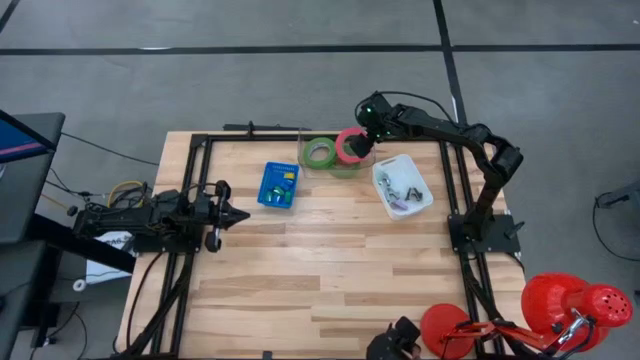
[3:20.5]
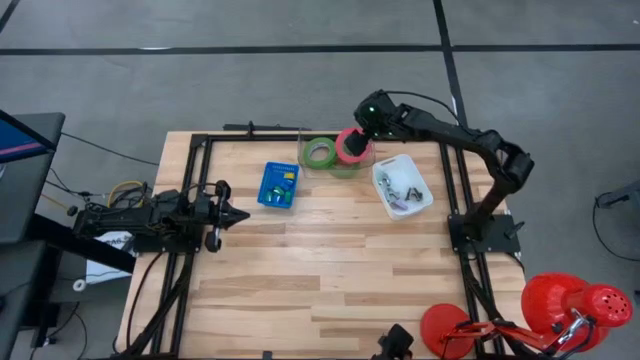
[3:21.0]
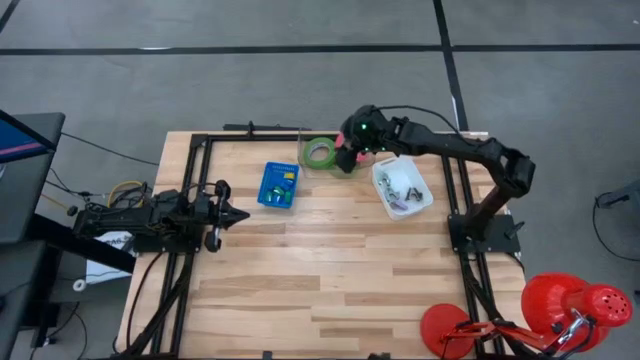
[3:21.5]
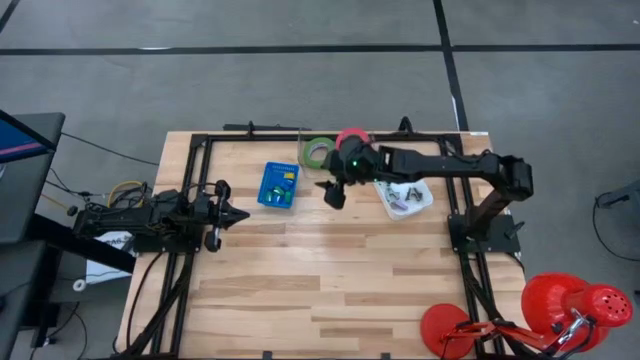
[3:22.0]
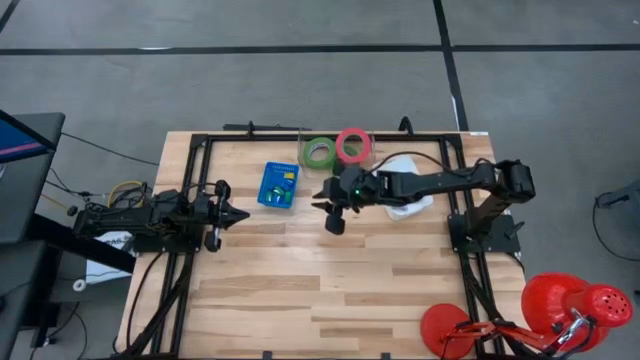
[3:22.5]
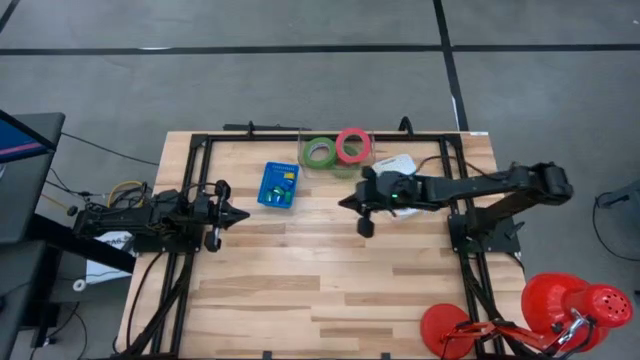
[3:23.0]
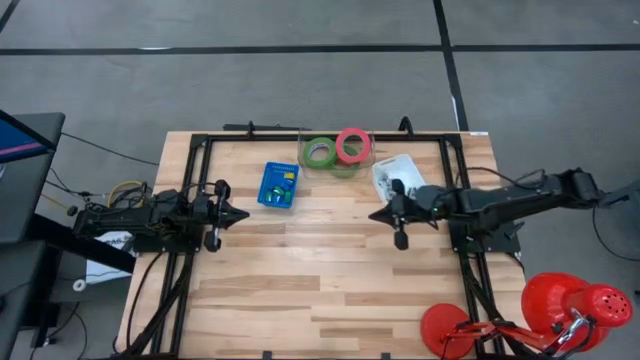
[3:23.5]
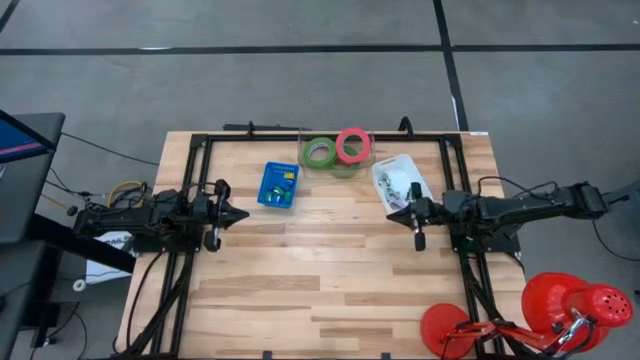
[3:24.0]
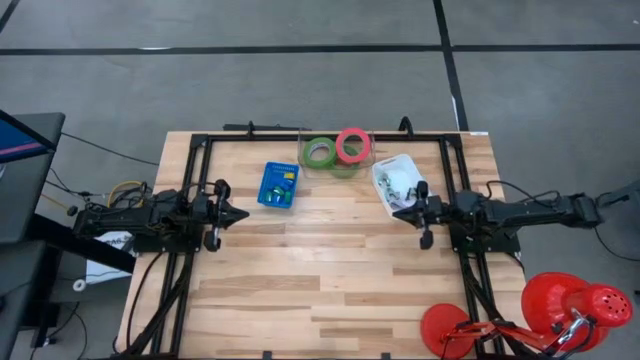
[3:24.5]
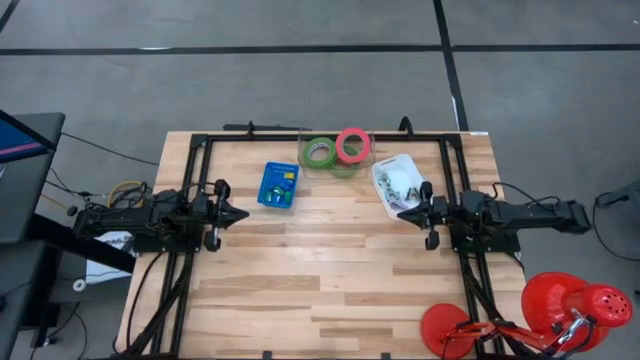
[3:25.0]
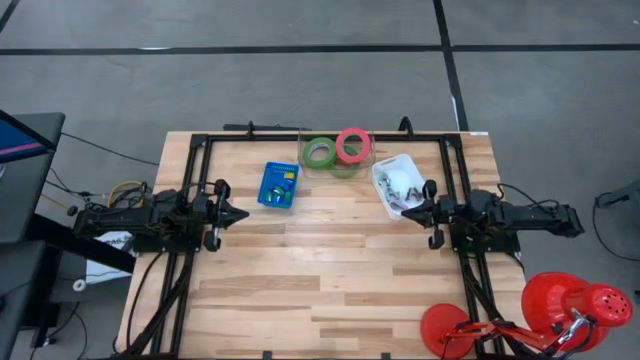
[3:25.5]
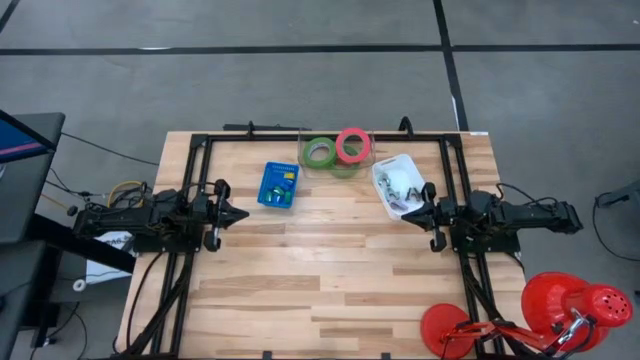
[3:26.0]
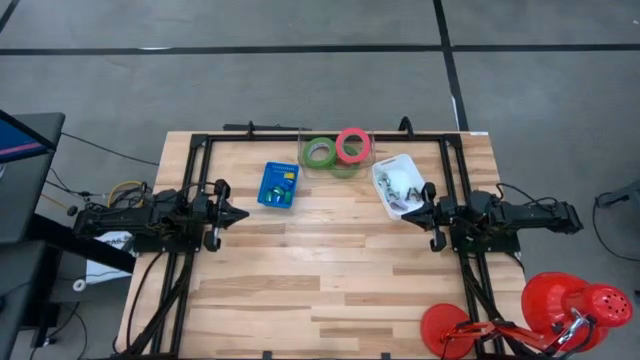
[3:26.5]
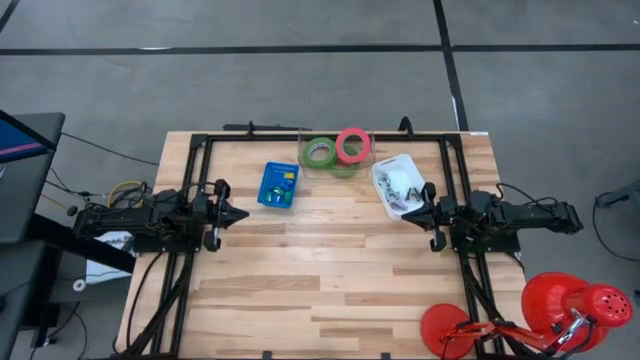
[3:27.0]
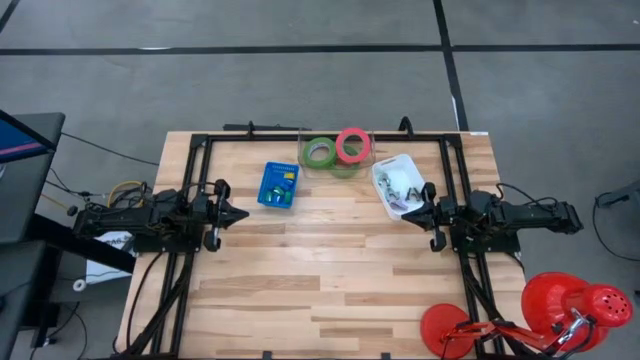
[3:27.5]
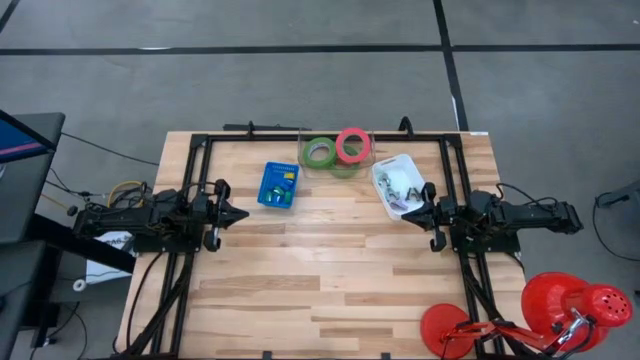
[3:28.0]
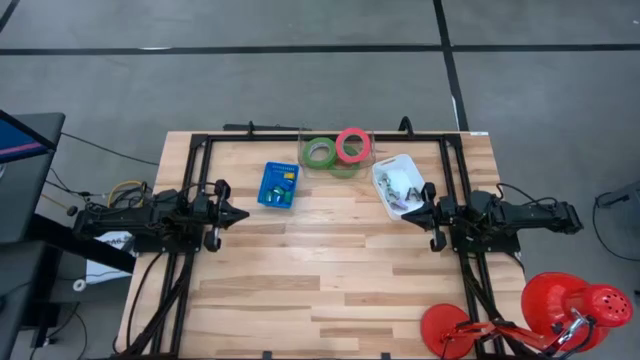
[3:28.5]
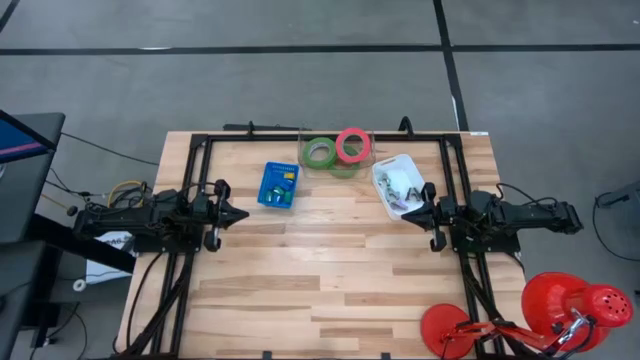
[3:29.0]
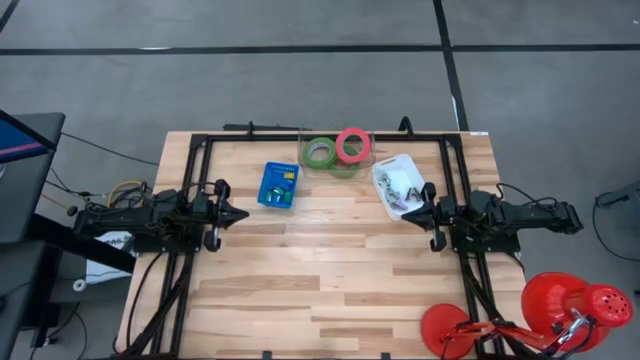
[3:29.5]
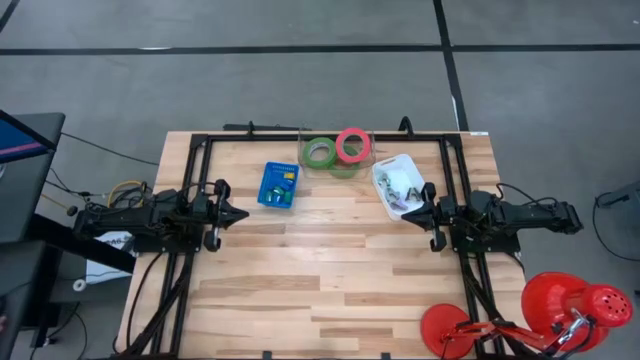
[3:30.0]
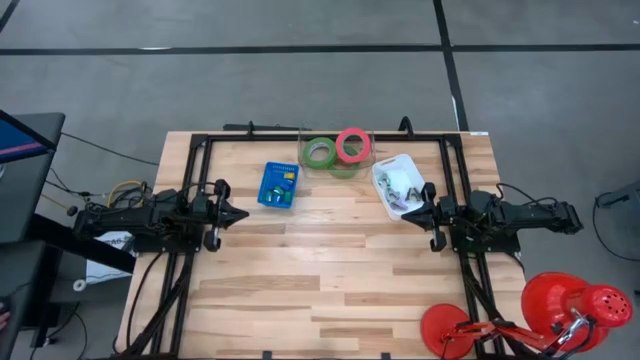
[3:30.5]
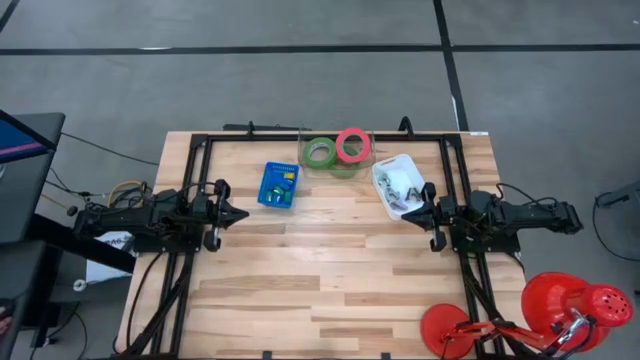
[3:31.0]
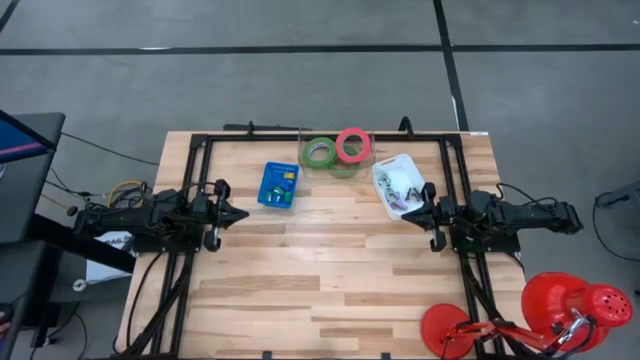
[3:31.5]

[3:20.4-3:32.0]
Task: Pick and place Stapler, Stapler remover, tape
Return to Home Position

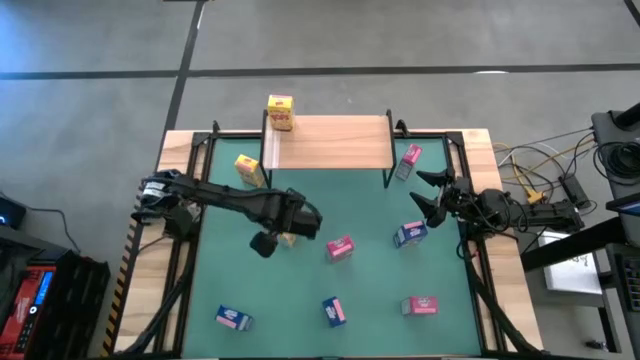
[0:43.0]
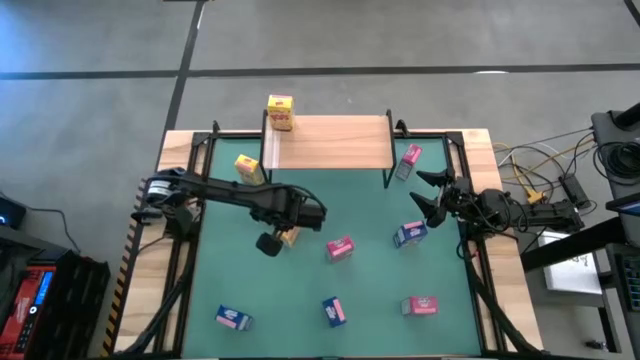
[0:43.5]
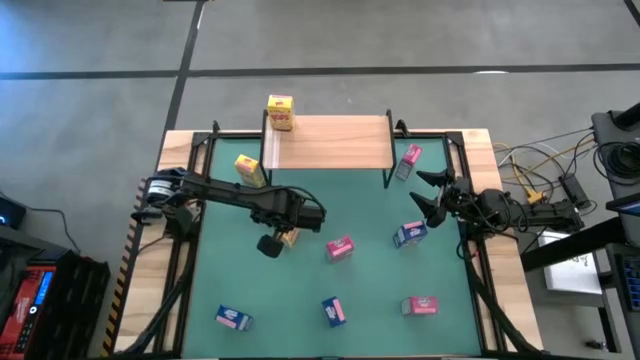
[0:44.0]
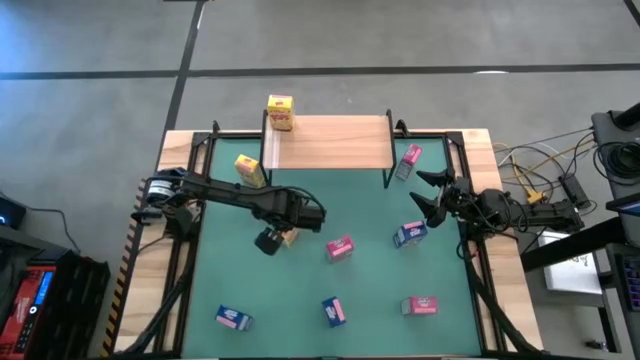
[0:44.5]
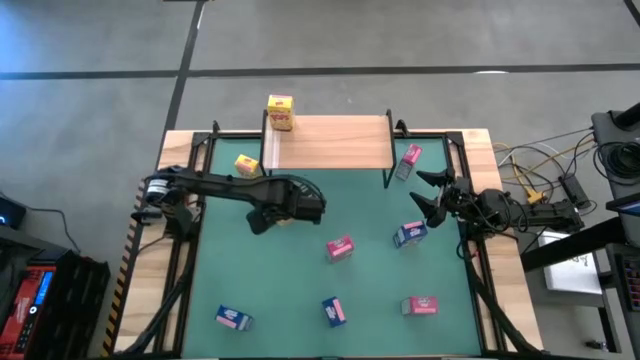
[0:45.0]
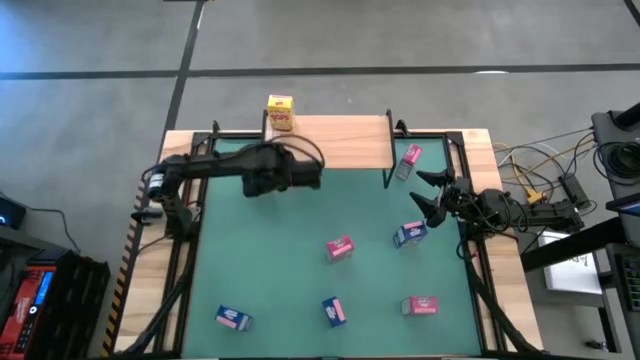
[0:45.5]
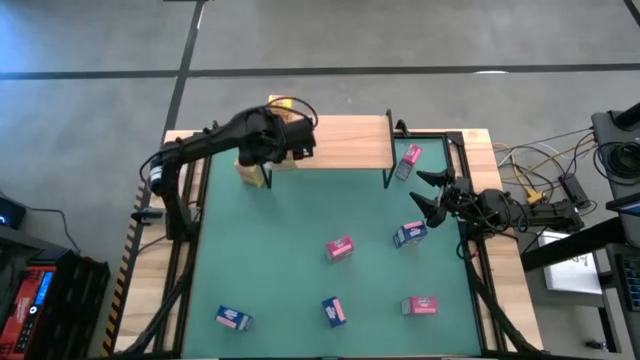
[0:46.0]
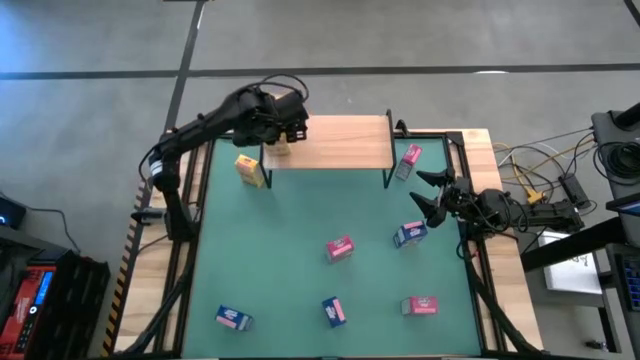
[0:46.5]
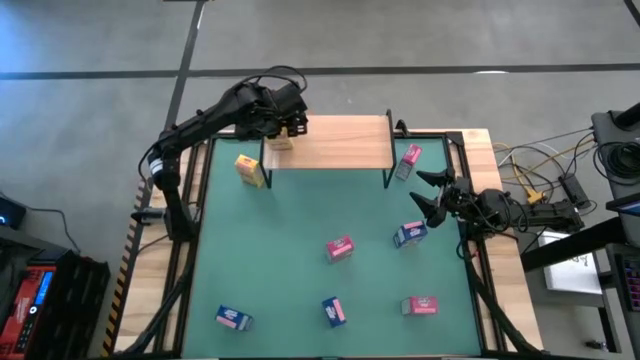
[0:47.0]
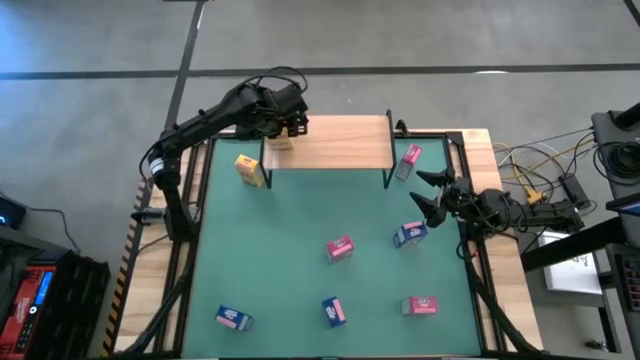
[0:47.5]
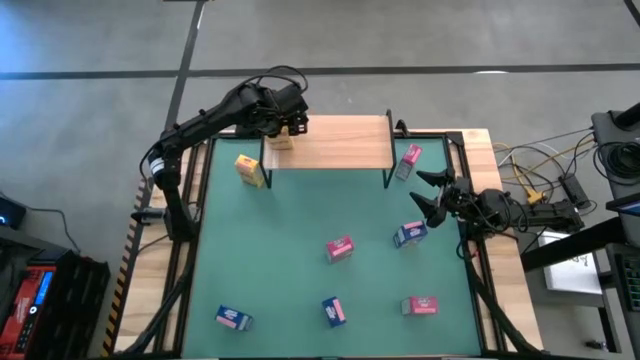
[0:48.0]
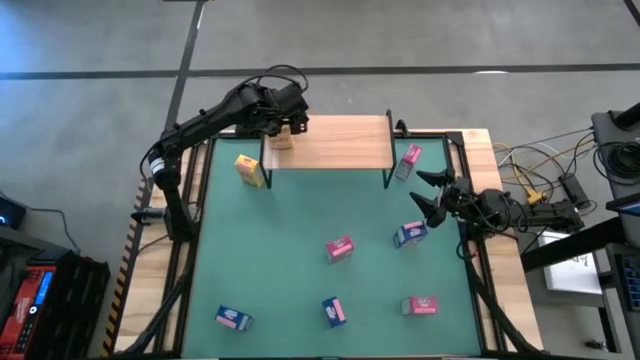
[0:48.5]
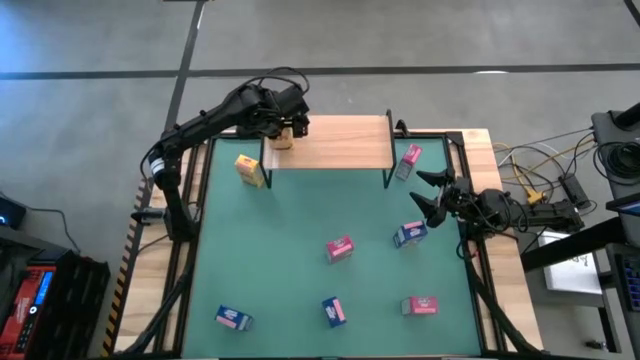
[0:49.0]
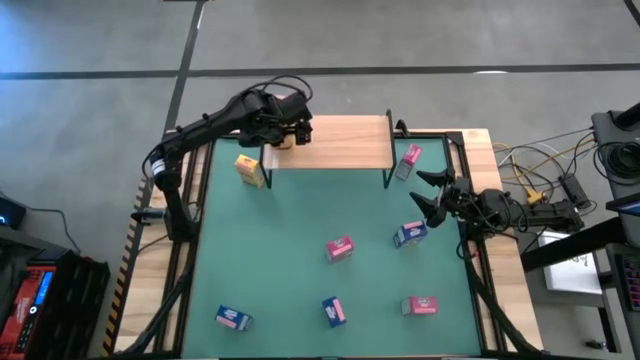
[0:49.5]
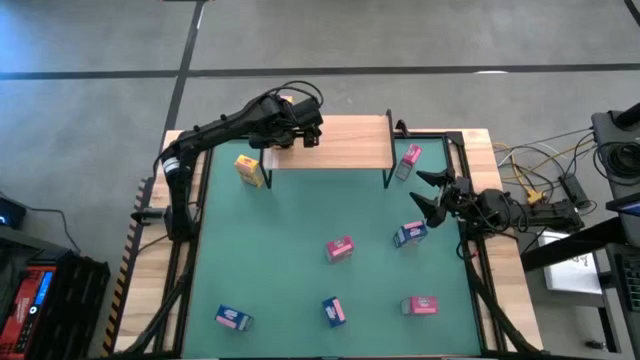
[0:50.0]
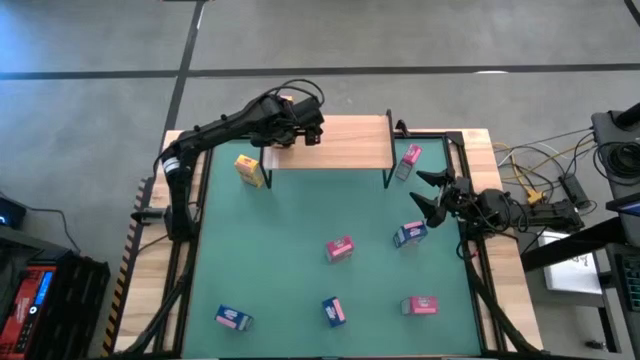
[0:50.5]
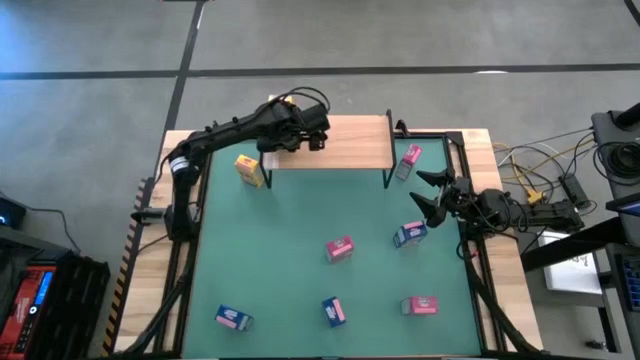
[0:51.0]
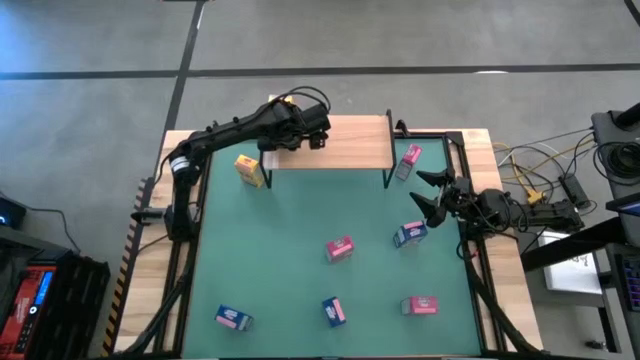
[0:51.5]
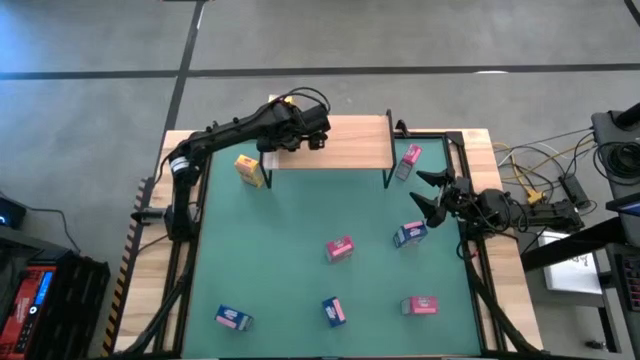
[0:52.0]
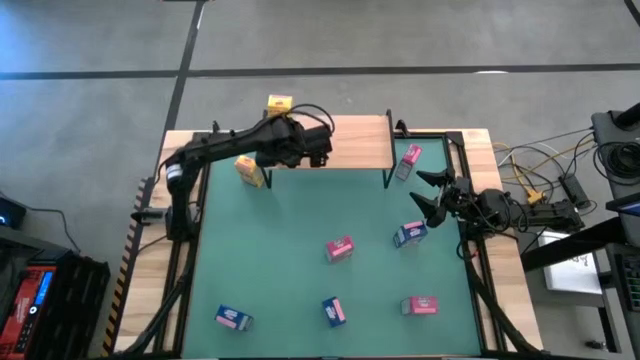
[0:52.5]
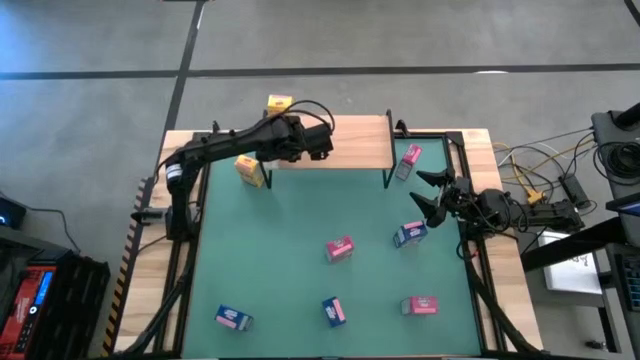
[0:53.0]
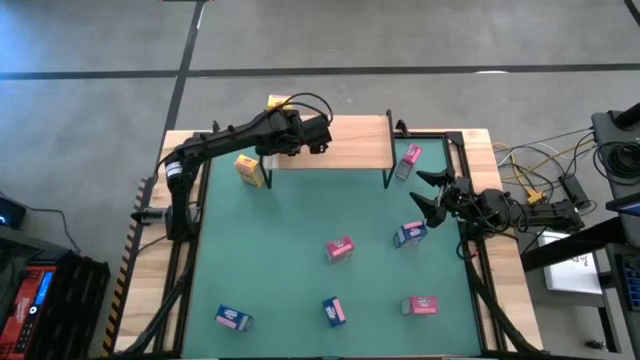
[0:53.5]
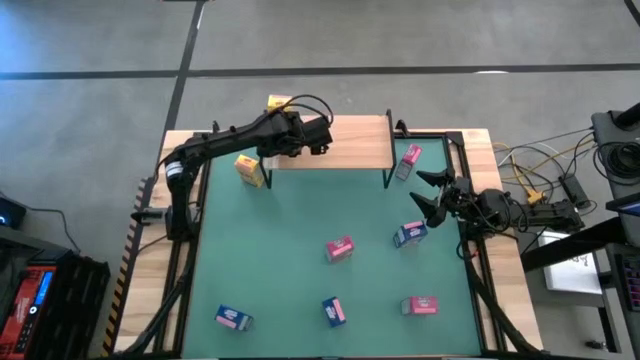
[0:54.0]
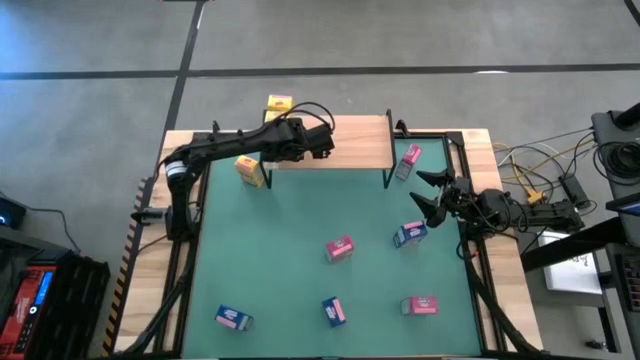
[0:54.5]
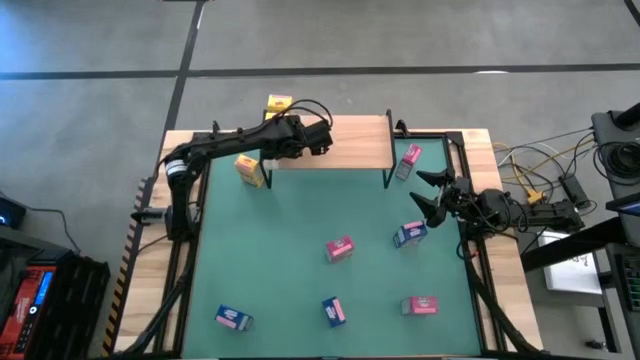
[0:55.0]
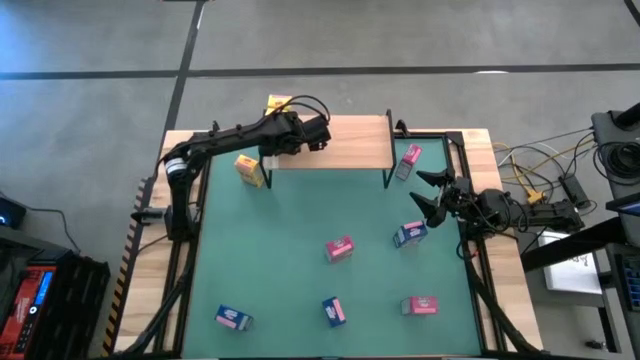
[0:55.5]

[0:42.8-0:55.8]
Task: Stack cereal on shelf
Put the bottom yellow cereal box on the shelf
